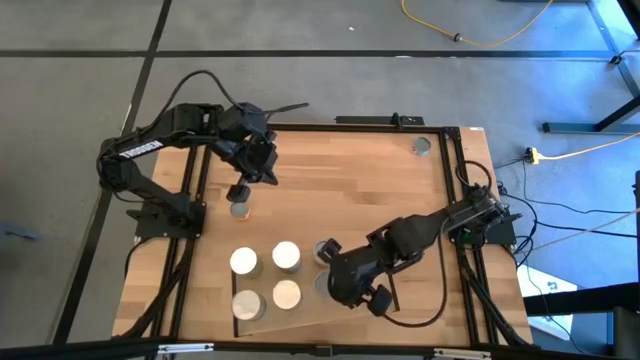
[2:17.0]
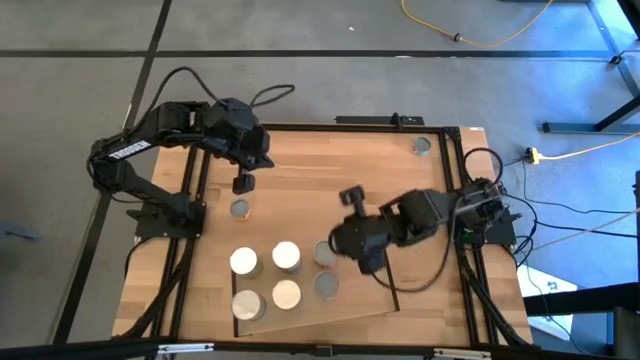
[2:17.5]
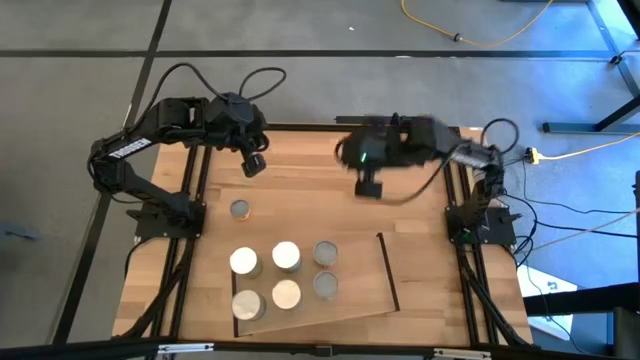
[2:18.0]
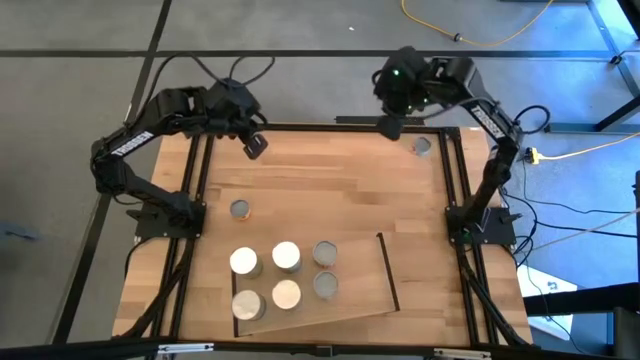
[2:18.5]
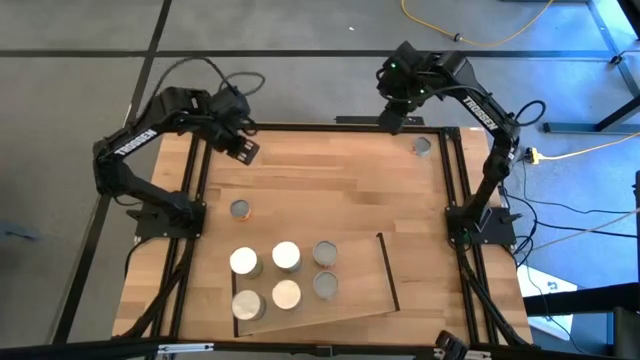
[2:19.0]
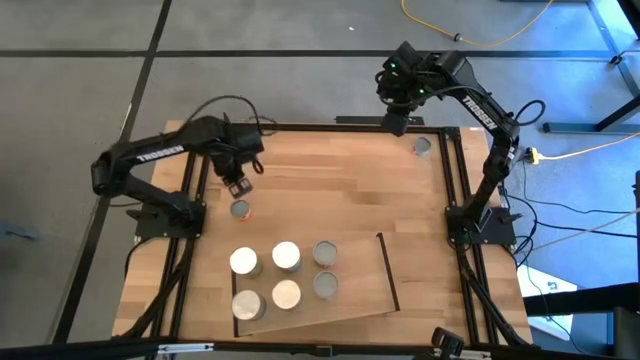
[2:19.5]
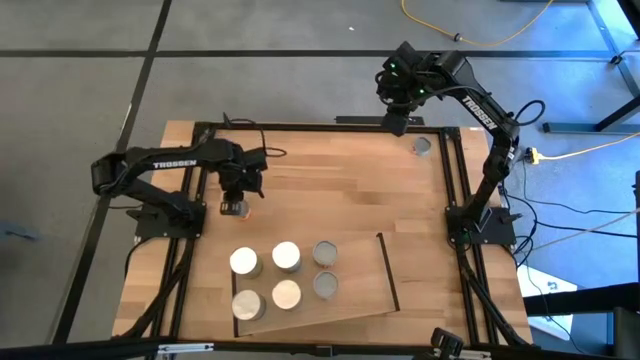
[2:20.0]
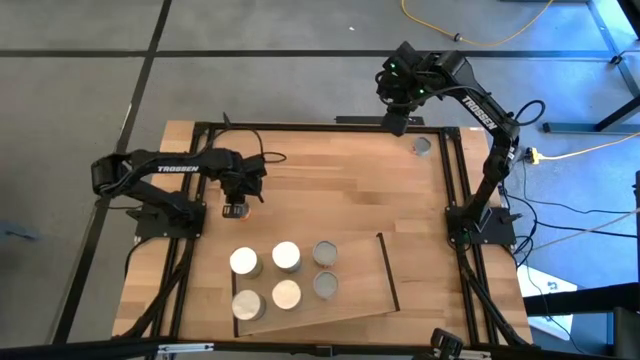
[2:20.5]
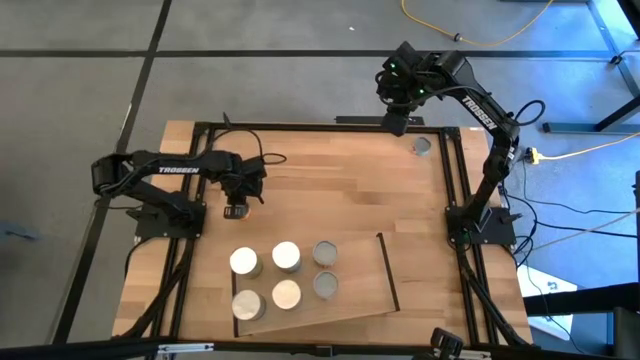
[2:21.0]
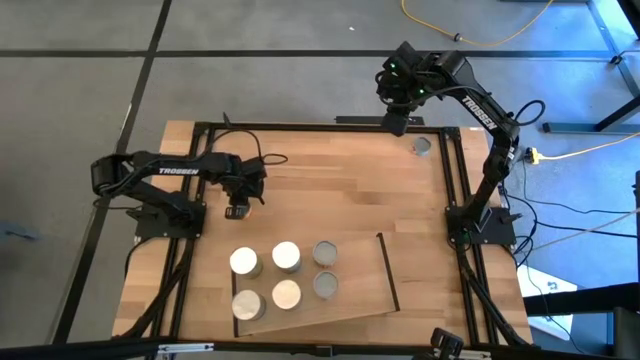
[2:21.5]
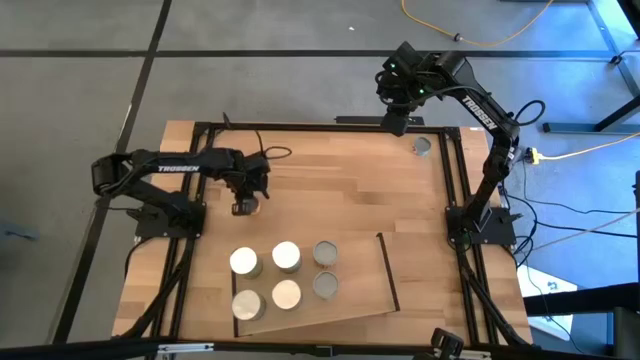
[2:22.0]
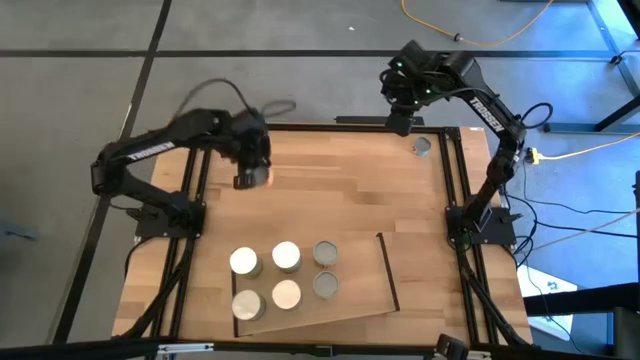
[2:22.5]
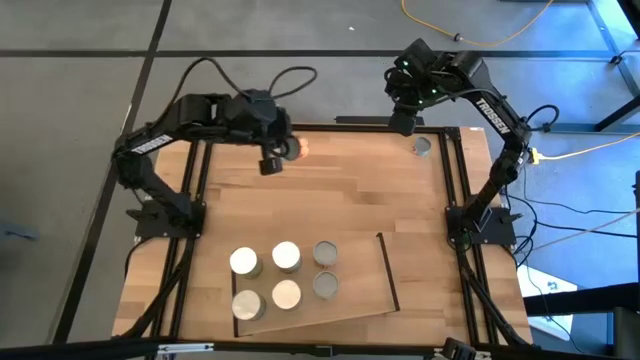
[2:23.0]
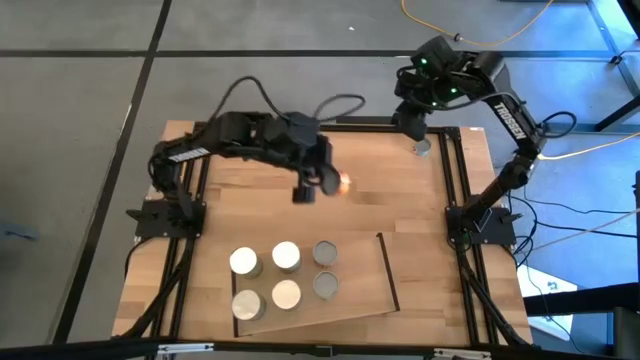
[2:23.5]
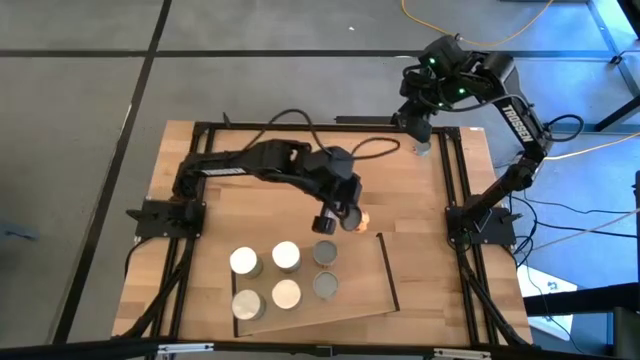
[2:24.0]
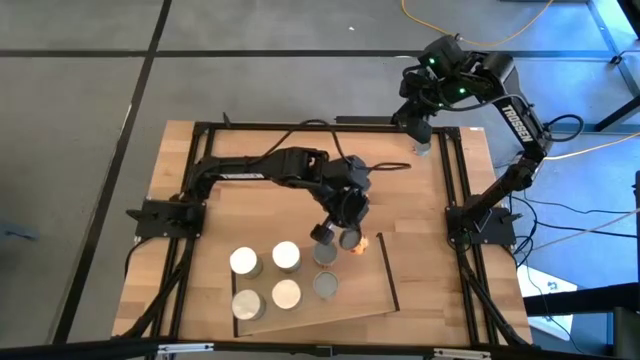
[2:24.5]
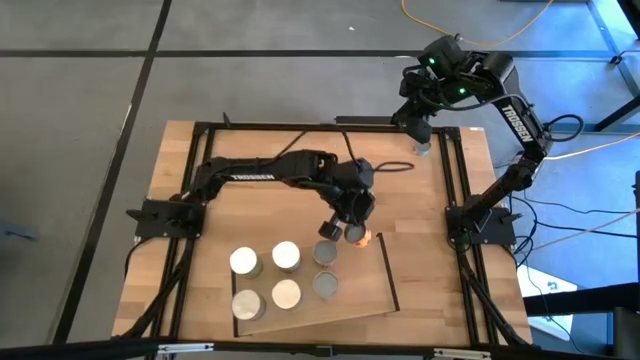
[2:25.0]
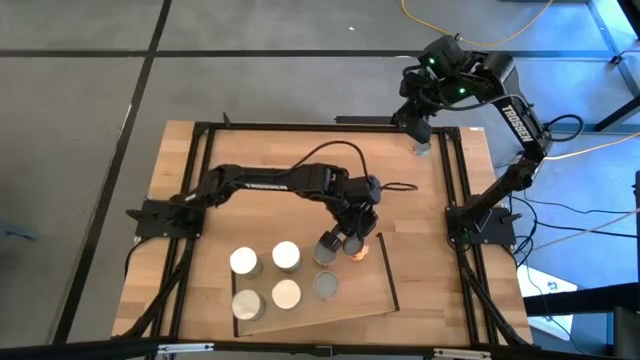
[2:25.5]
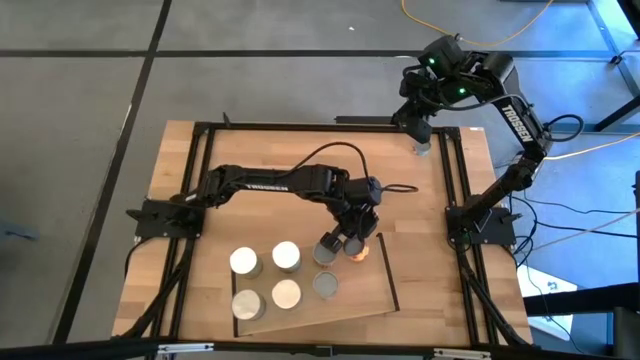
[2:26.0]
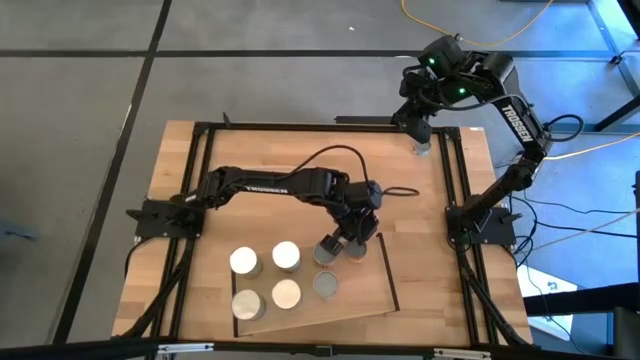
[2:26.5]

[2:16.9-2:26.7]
Task: Pick and place cans onto a shelf
Put the canned pineapple rings on the shelf

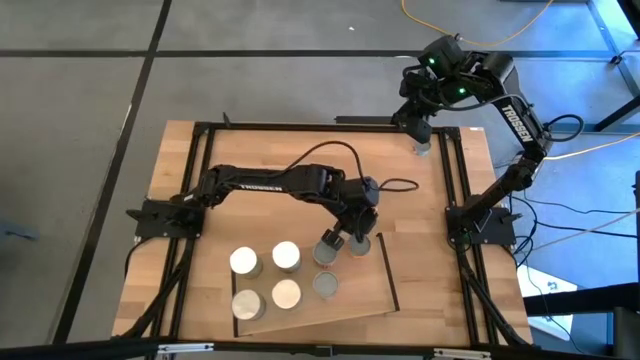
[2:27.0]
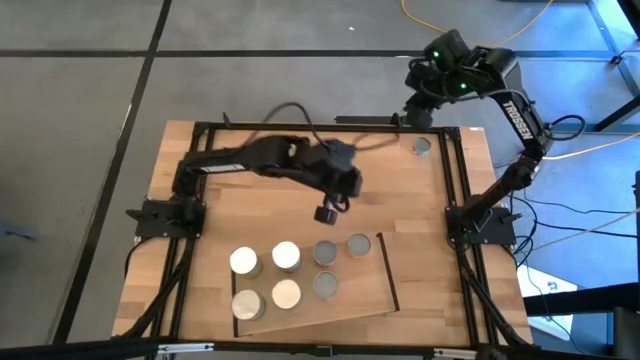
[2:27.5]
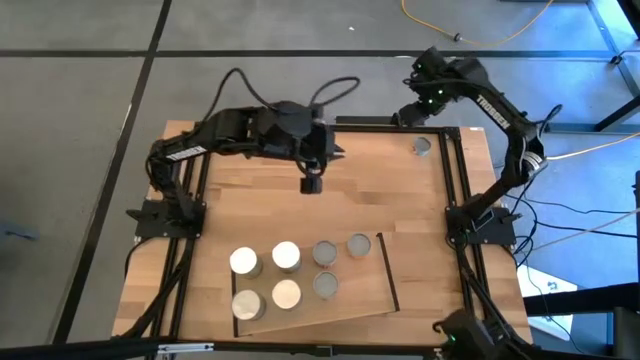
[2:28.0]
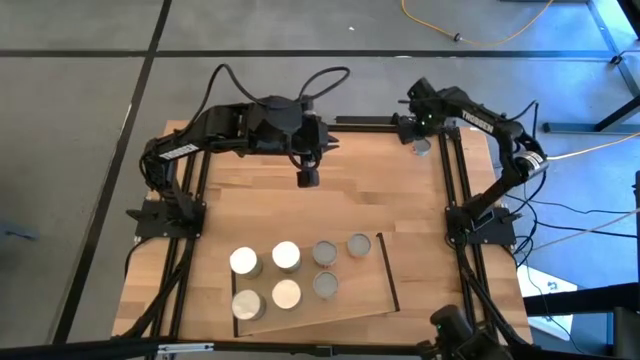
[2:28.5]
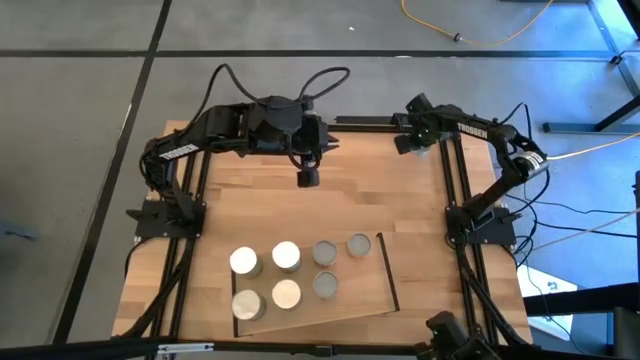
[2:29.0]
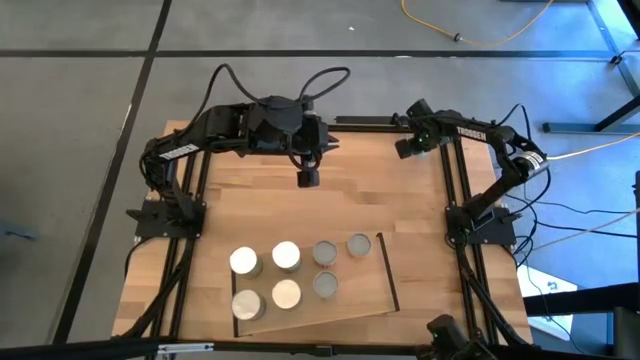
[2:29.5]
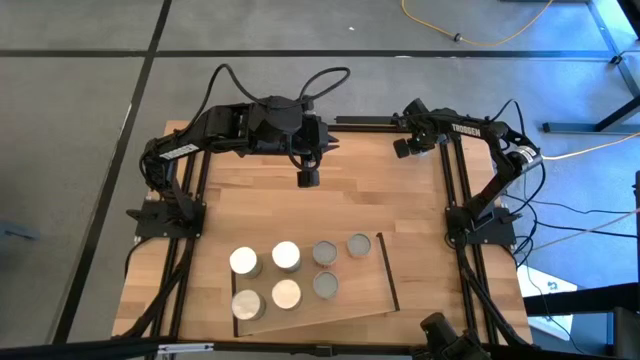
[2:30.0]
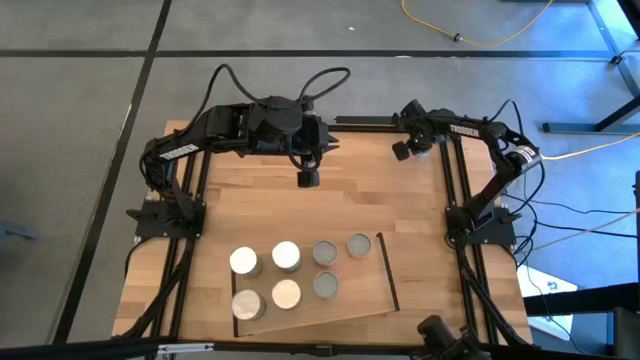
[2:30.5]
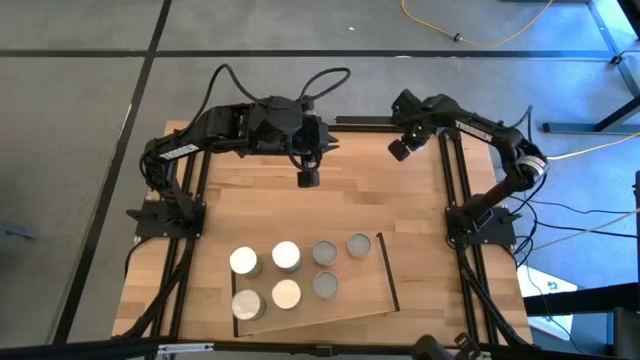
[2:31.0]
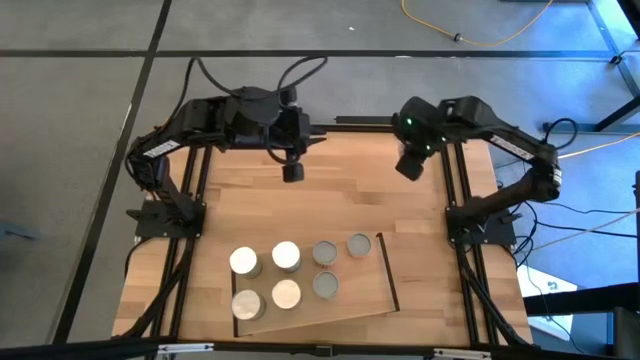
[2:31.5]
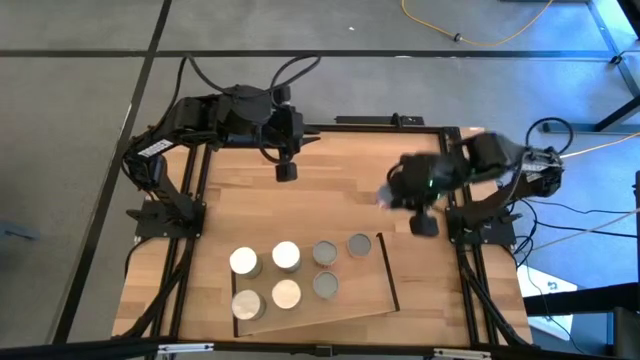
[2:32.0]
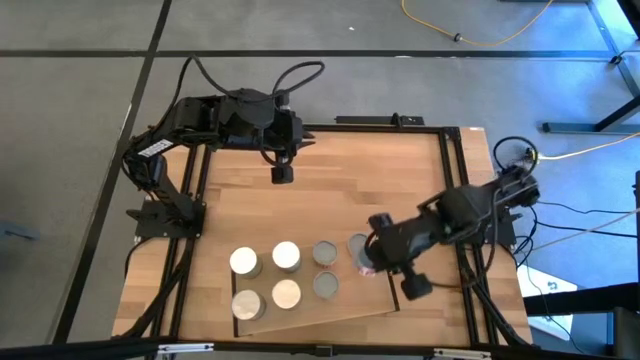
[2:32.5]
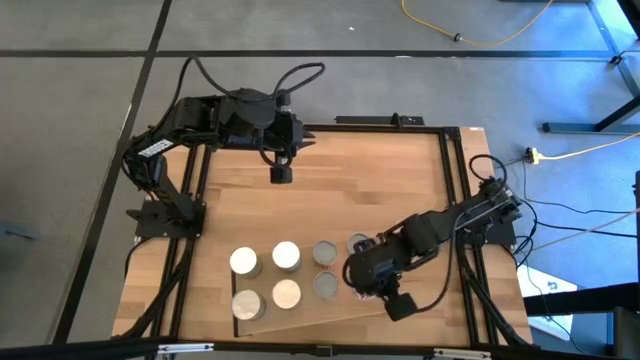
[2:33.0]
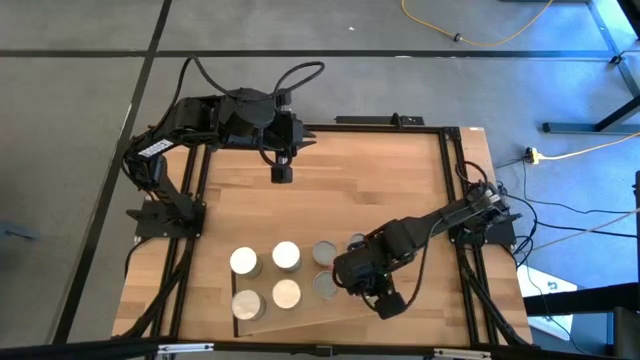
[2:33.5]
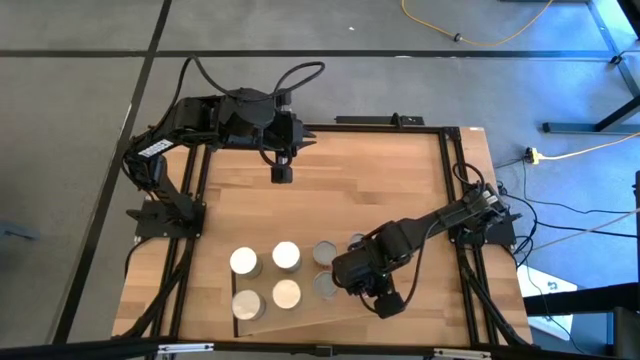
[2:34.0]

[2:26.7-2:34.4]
Put the canned tuna on the shelf

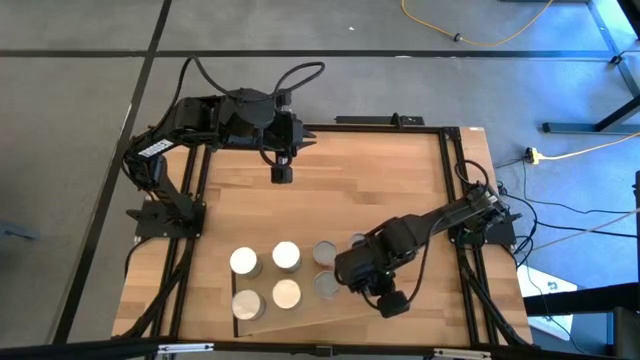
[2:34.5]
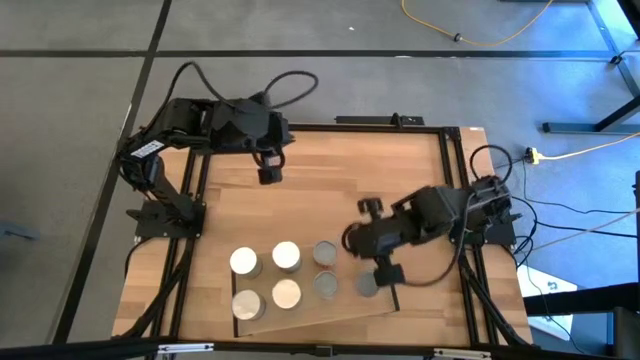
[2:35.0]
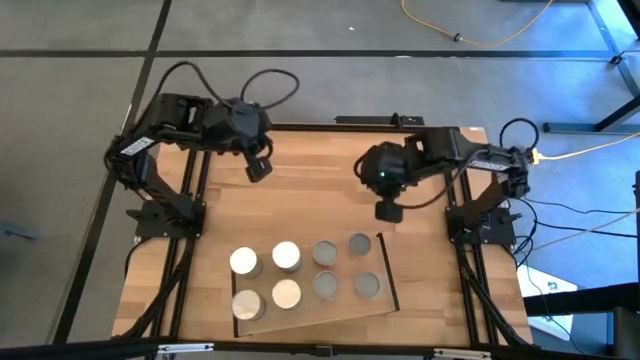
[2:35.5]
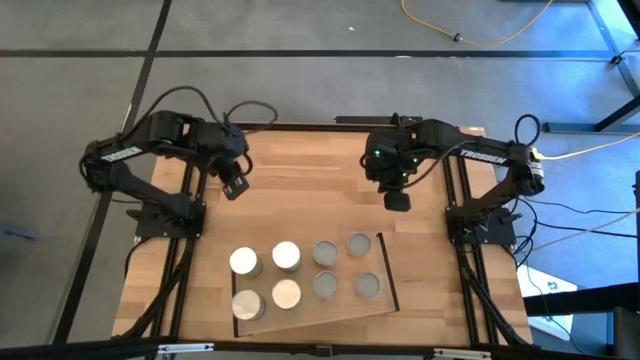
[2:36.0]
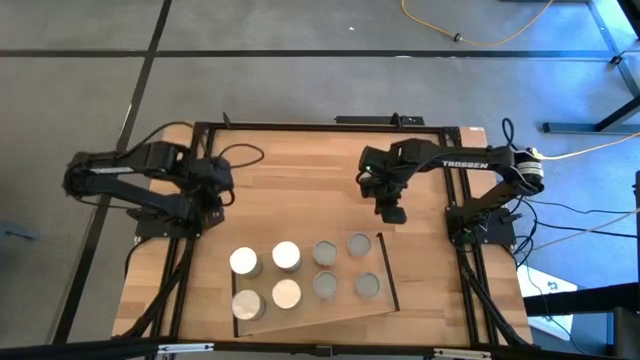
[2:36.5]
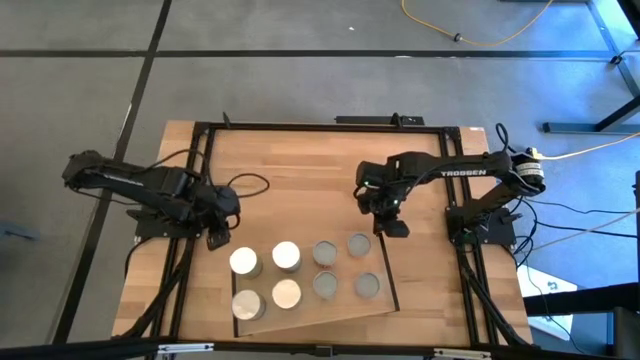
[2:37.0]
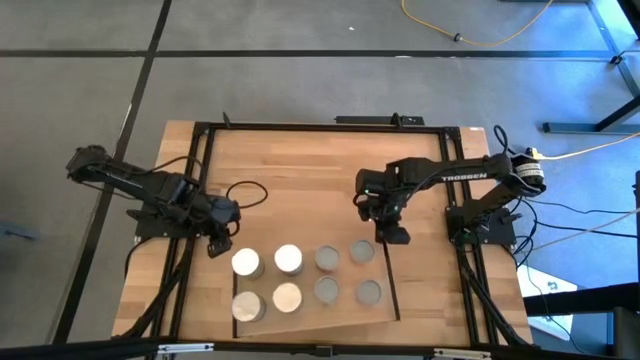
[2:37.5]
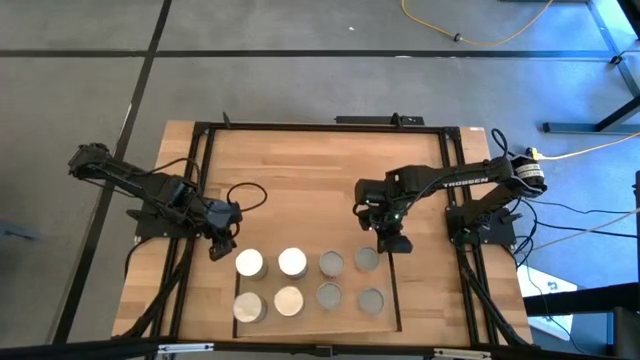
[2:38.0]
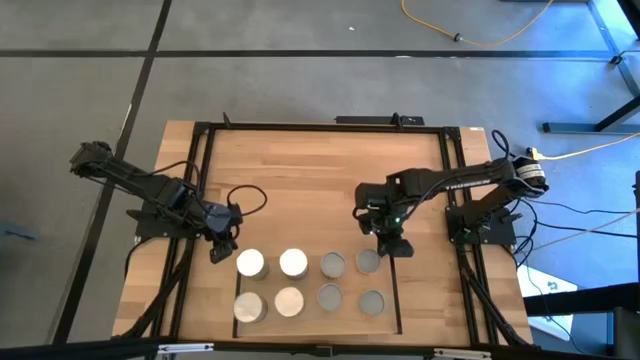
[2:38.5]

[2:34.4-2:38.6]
Adjust the shelf
